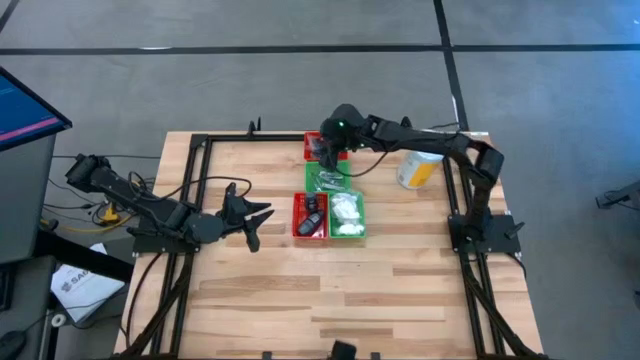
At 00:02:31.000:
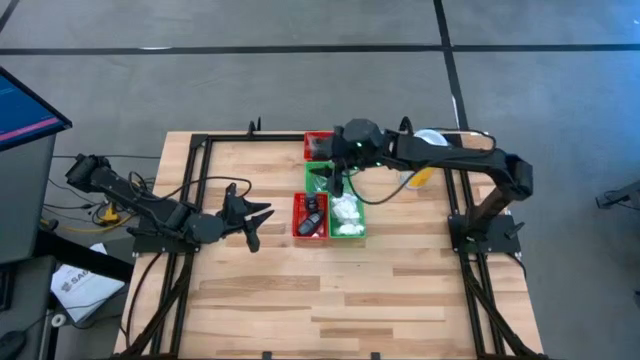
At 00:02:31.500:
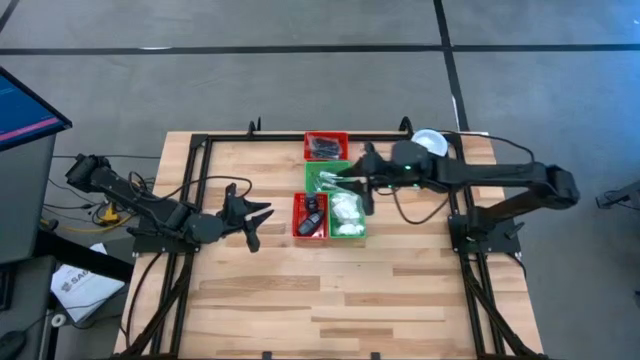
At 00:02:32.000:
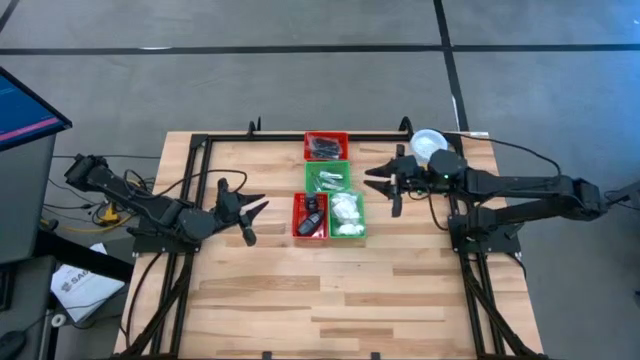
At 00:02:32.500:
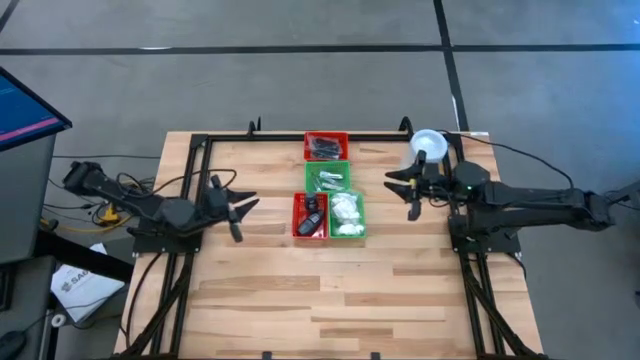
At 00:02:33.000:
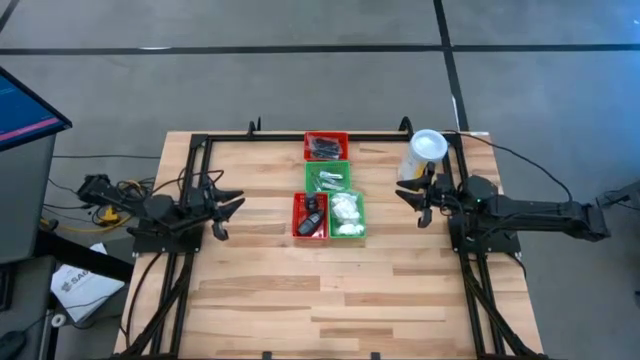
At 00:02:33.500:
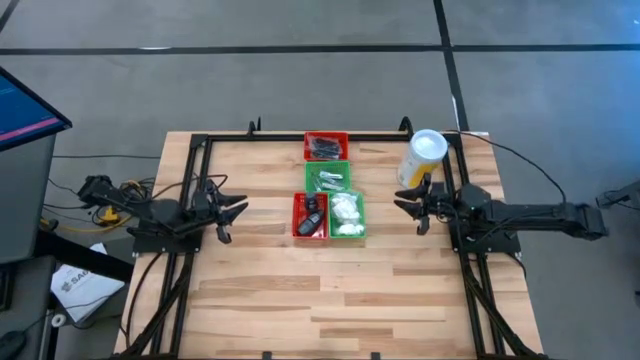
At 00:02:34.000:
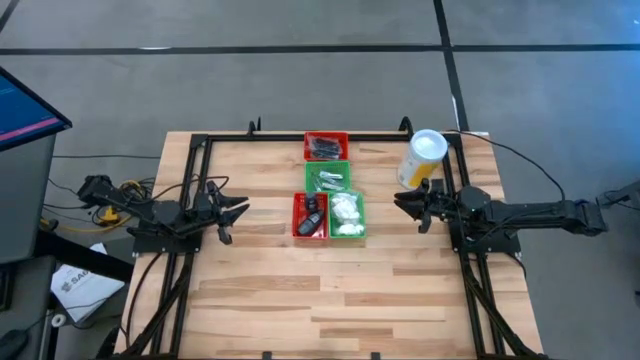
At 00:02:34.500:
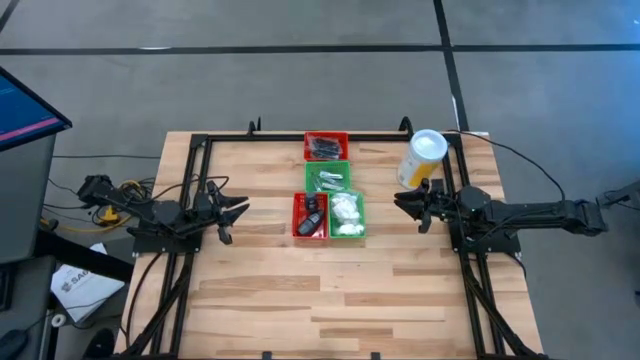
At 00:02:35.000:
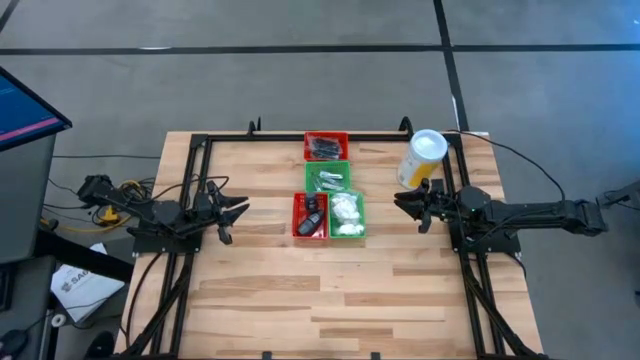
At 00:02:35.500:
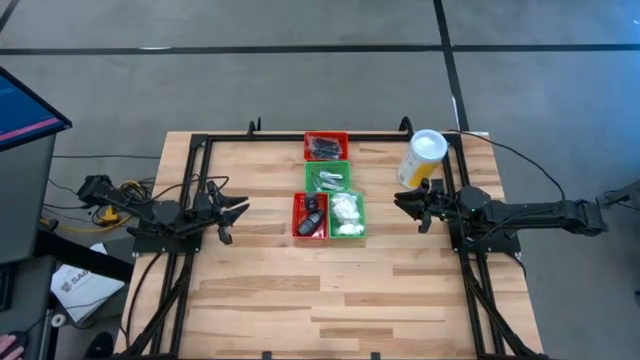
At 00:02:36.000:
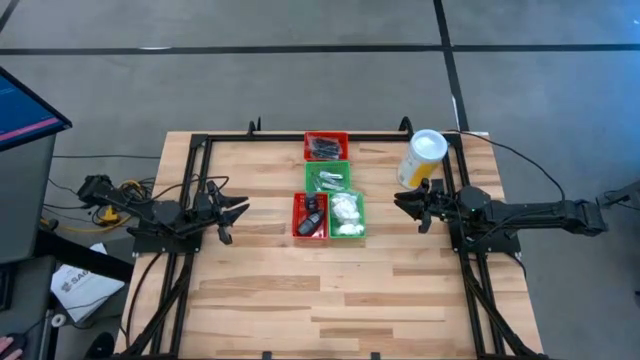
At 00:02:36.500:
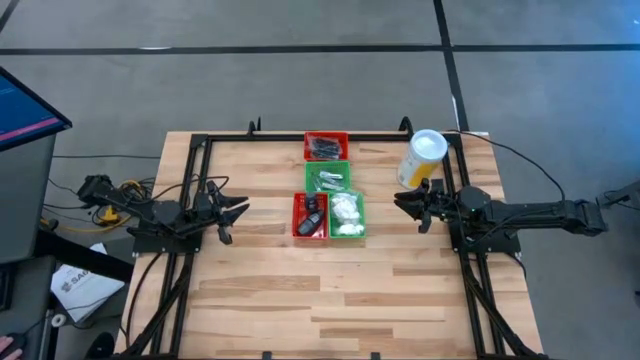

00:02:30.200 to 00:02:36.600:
Task: Pick & Place Travel size toiletries
Return to Home Position

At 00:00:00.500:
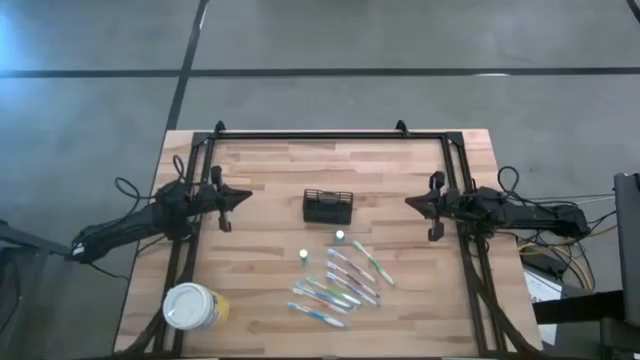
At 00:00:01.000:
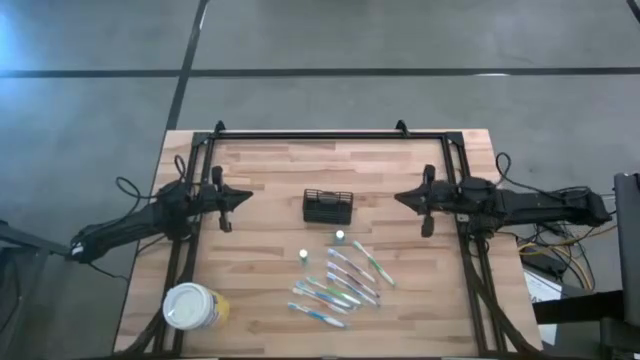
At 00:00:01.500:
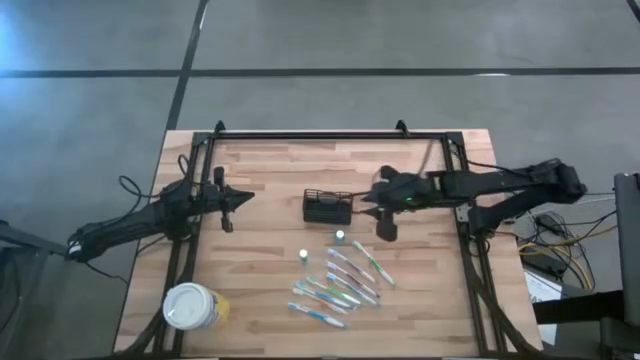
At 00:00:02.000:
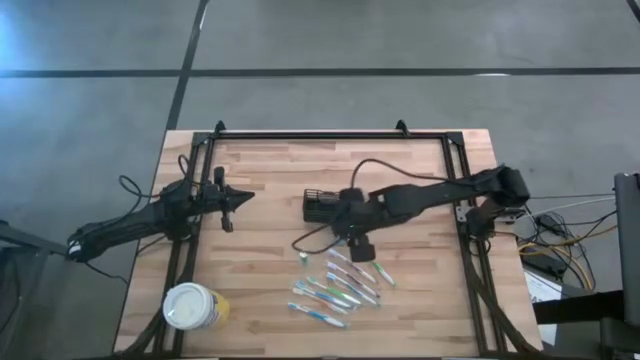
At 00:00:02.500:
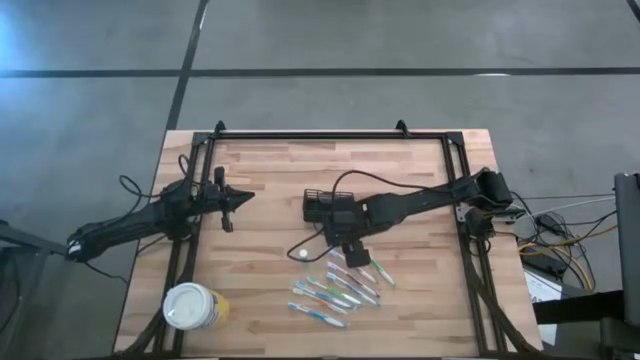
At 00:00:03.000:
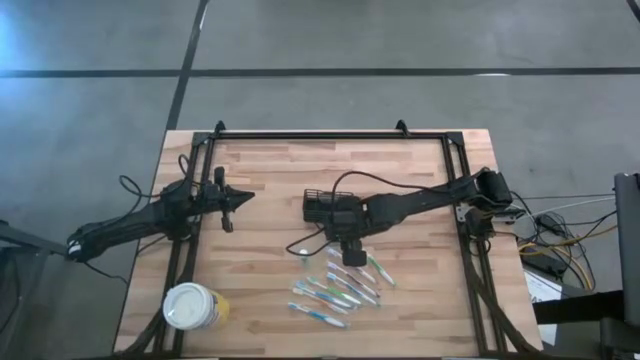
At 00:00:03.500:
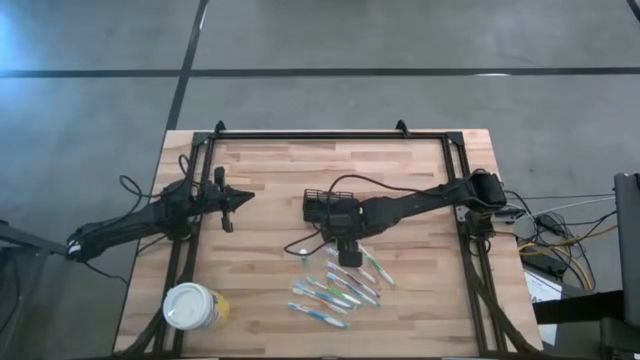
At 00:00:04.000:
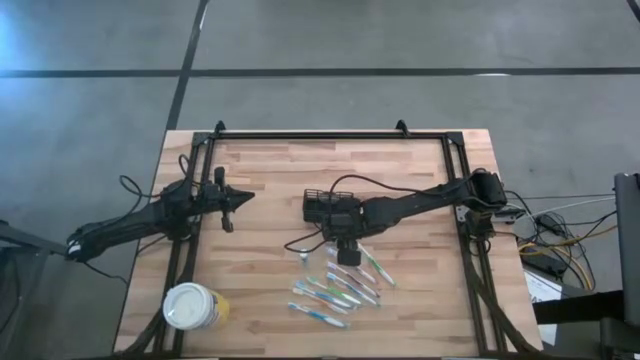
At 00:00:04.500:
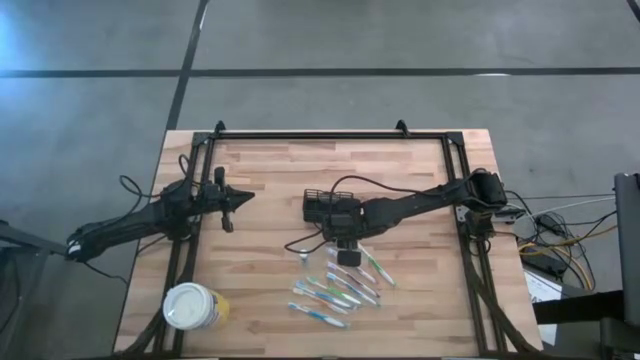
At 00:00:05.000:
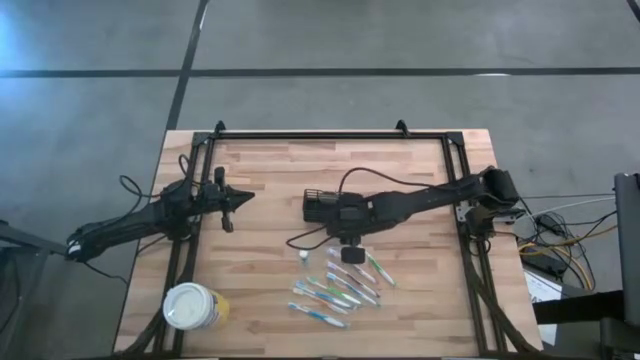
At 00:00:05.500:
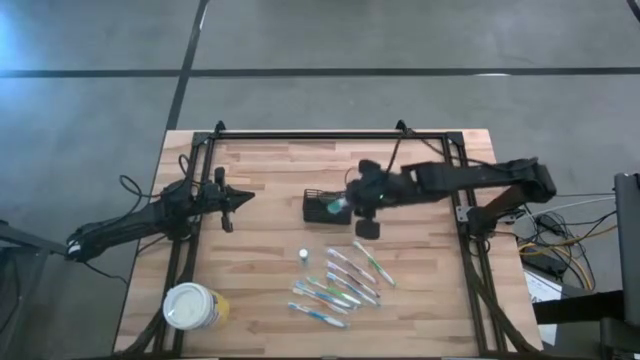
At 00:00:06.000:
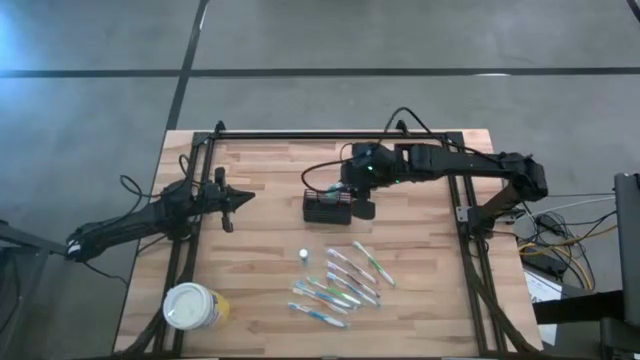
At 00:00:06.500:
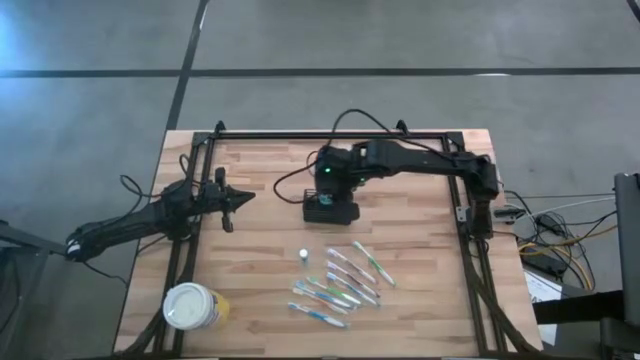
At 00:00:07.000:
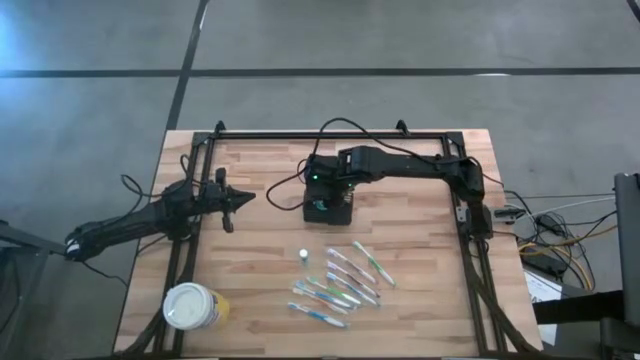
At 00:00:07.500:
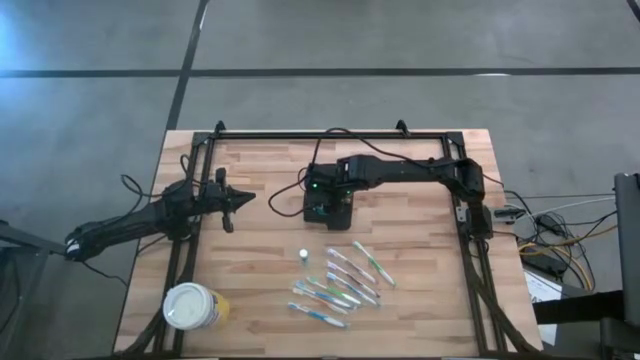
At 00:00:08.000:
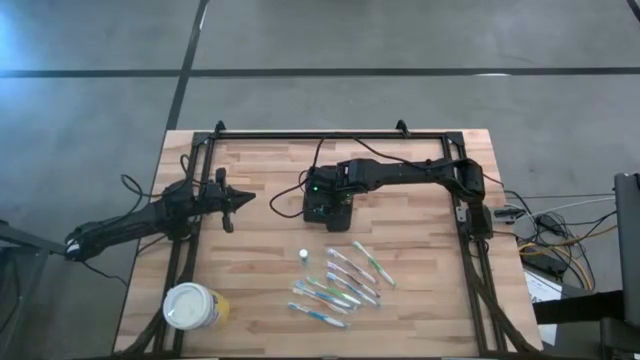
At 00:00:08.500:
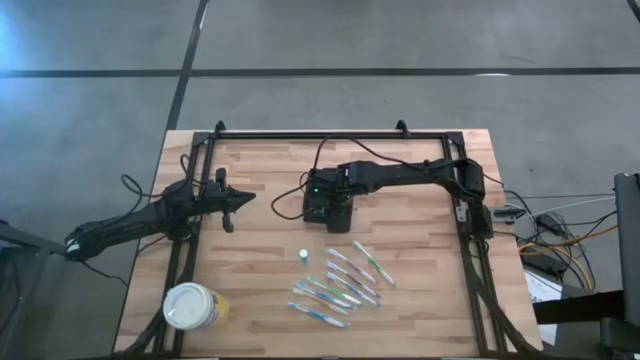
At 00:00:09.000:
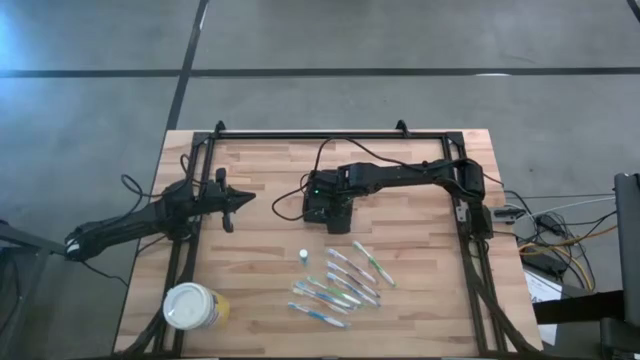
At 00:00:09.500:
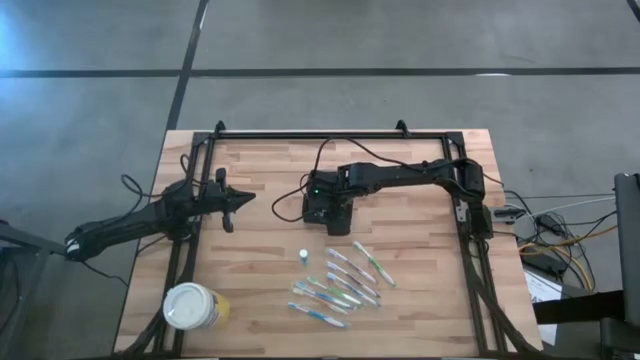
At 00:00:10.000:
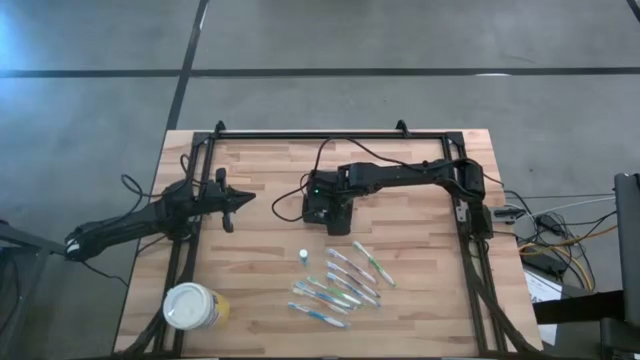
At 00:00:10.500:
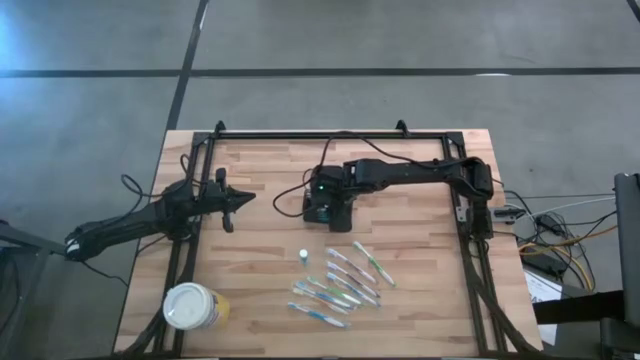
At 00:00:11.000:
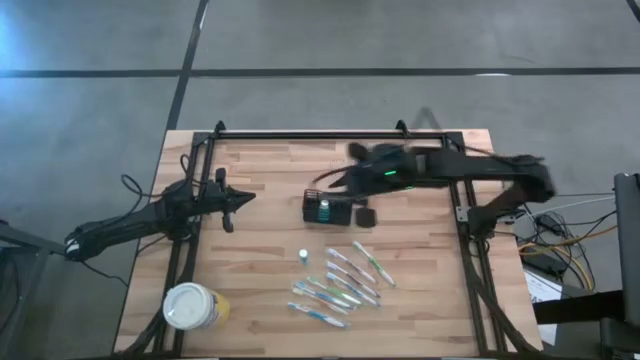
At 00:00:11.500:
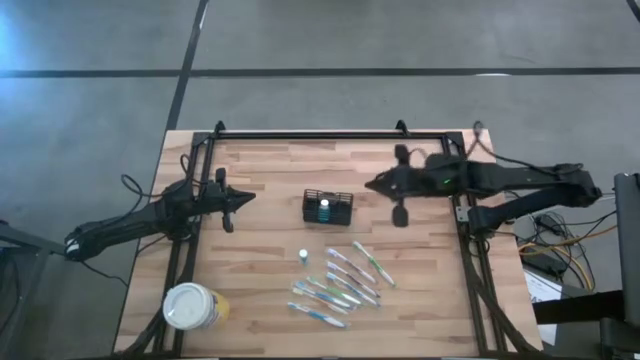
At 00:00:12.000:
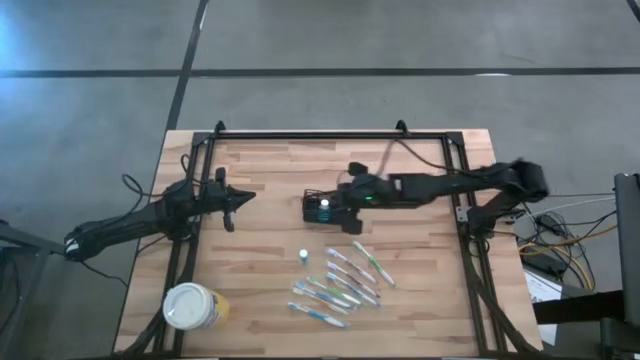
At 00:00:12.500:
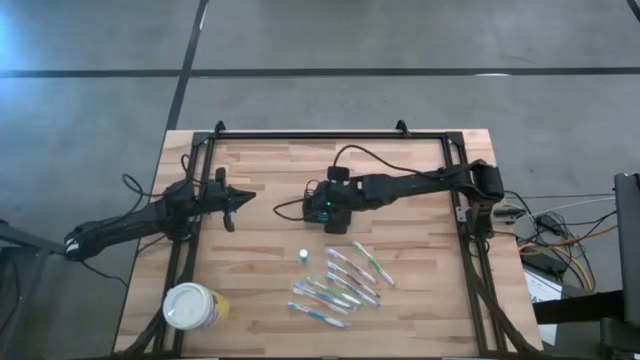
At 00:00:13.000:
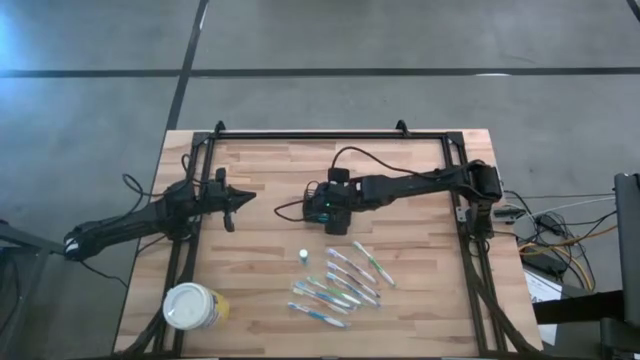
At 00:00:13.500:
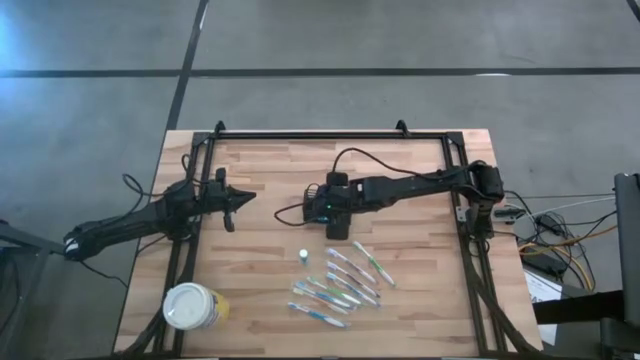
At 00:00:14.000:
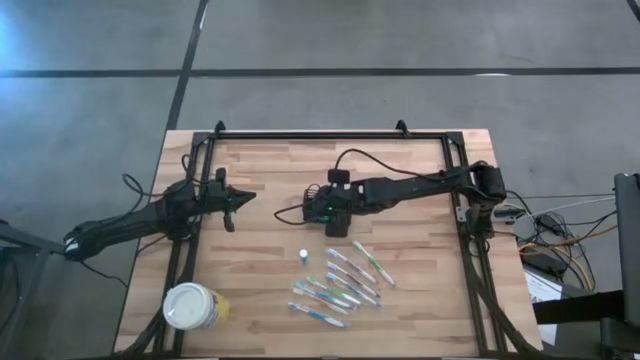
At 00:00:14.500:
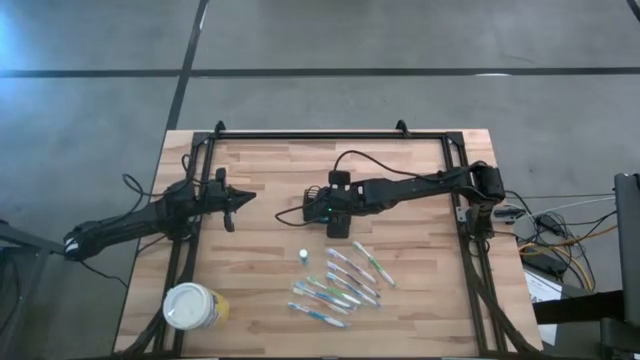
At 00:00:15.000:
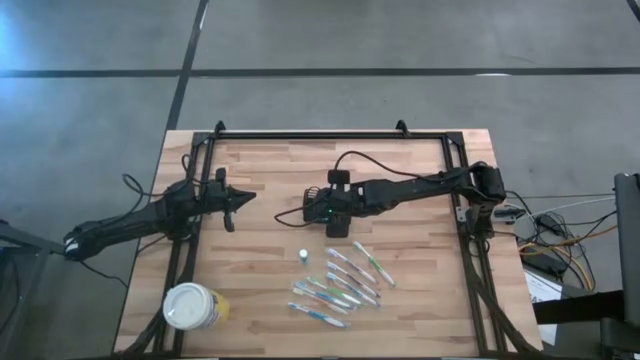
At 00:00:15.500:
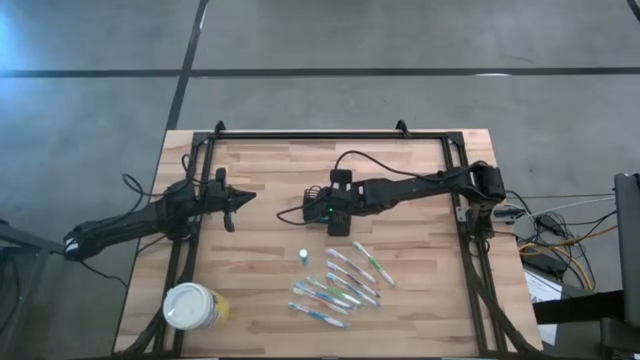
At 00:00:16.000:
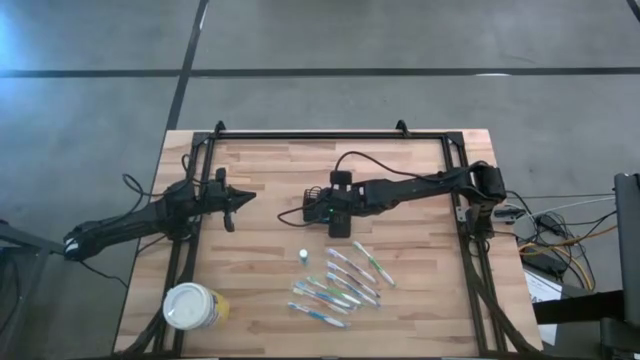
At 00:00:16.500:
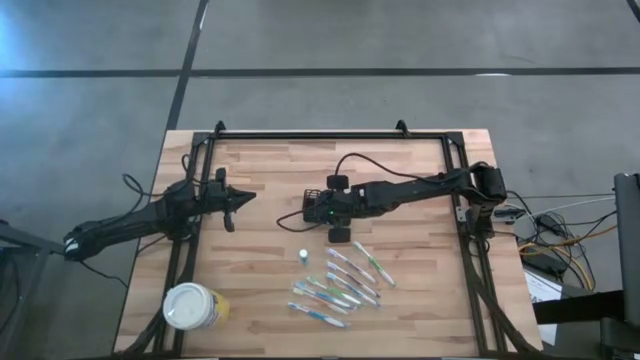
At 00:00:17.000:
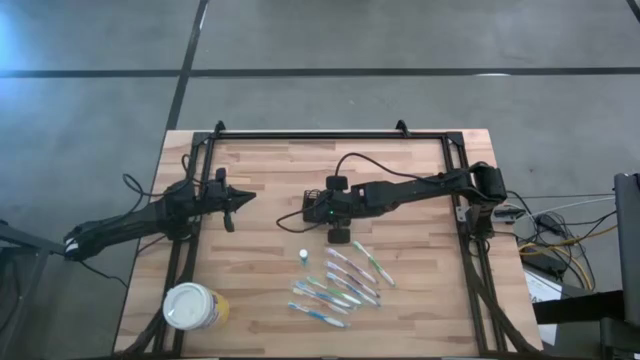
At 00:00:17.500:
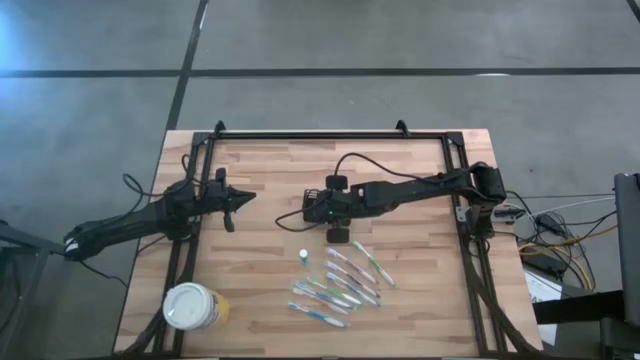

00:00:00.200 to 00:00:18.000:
Task: Pick & Place toothbrushing station
Put the top blue mouthwash into the black organizer
